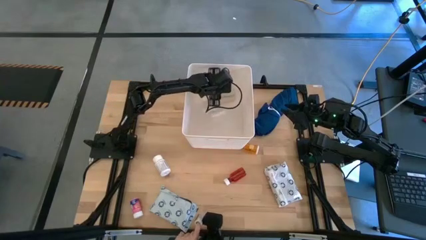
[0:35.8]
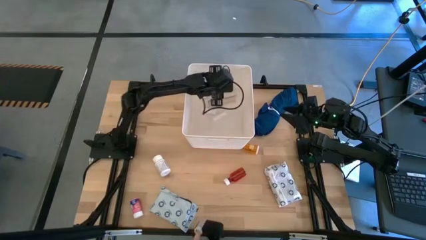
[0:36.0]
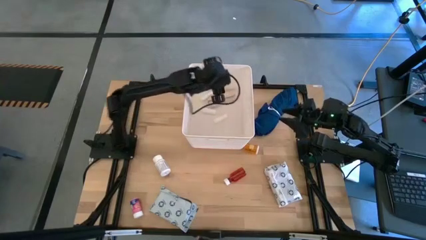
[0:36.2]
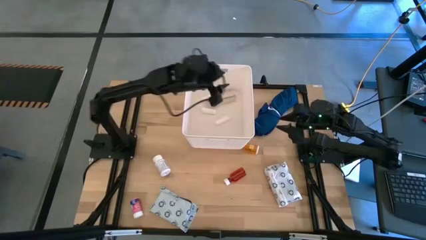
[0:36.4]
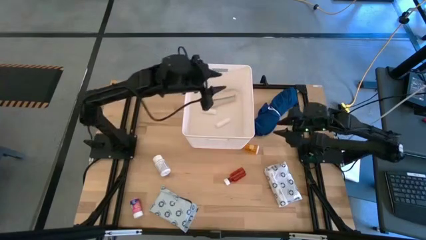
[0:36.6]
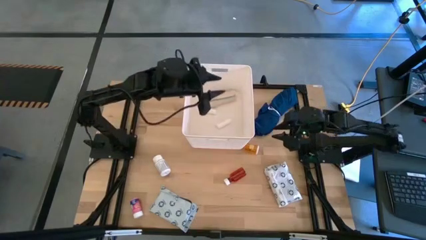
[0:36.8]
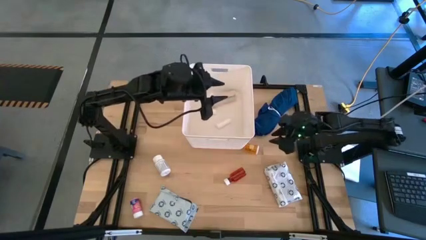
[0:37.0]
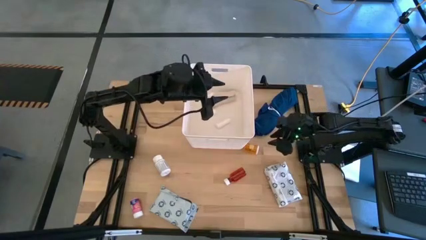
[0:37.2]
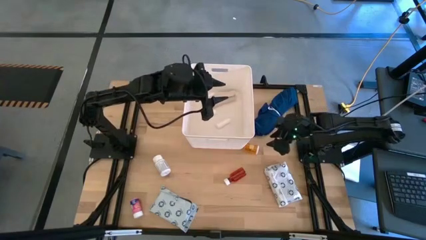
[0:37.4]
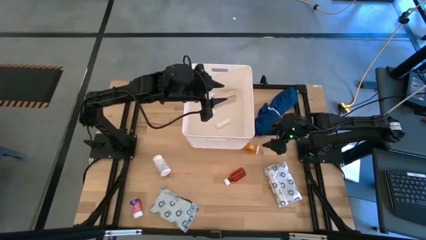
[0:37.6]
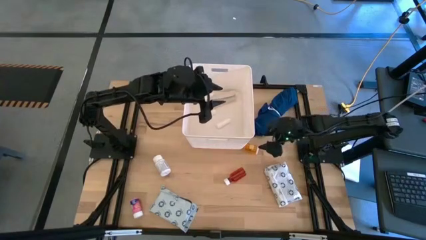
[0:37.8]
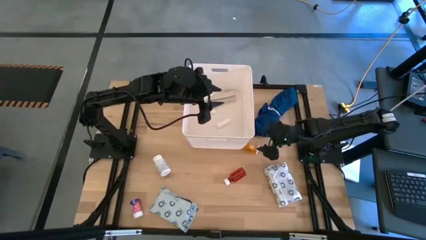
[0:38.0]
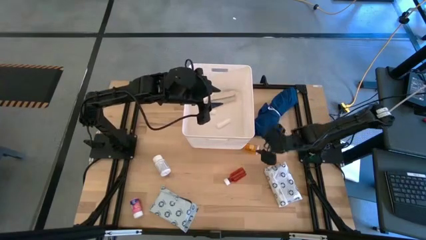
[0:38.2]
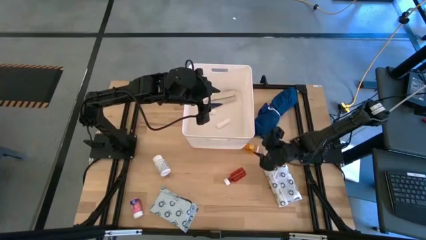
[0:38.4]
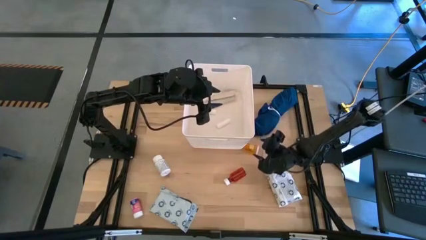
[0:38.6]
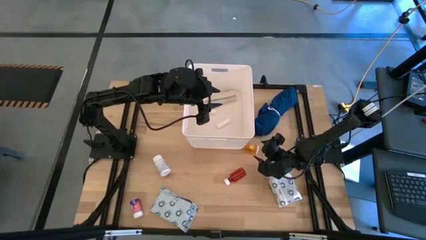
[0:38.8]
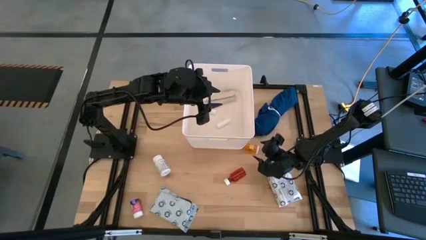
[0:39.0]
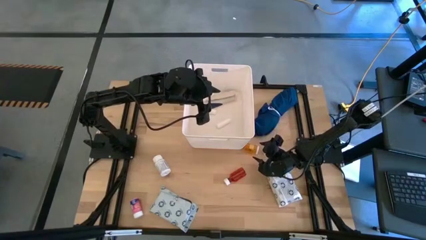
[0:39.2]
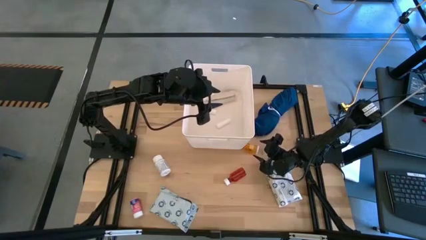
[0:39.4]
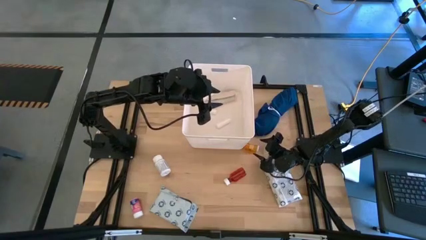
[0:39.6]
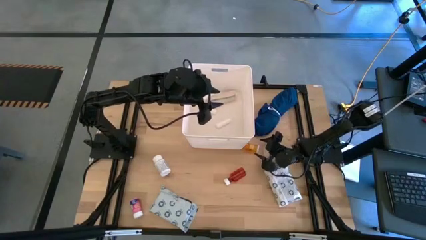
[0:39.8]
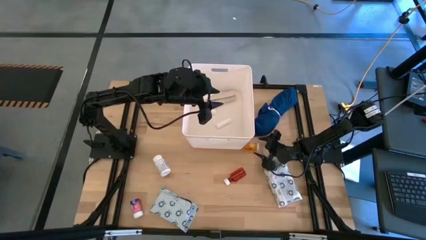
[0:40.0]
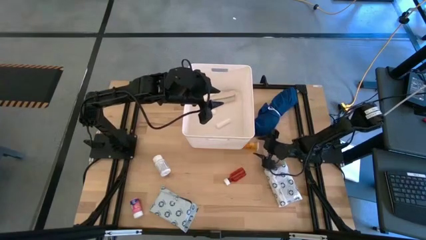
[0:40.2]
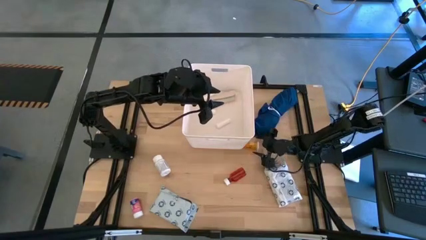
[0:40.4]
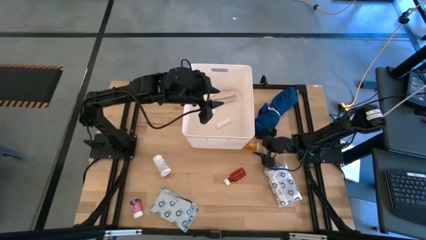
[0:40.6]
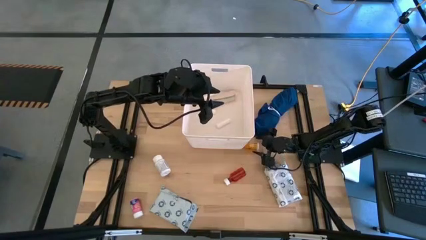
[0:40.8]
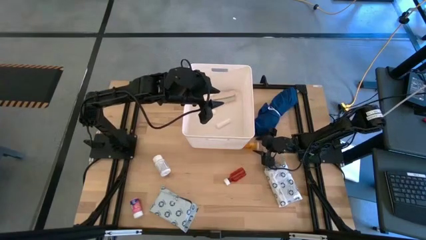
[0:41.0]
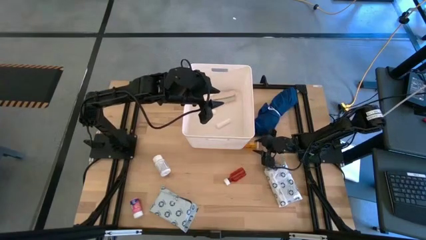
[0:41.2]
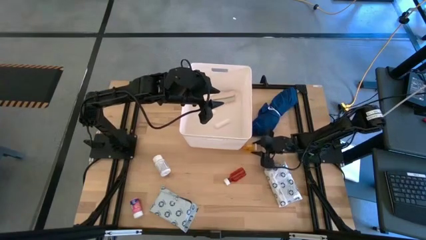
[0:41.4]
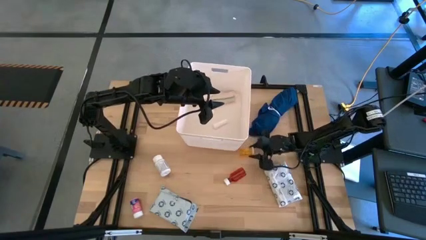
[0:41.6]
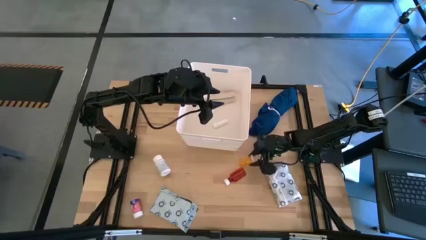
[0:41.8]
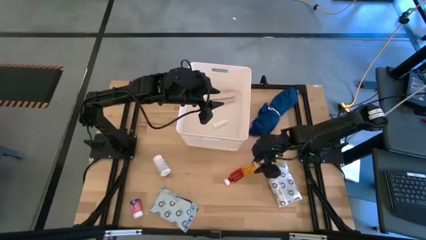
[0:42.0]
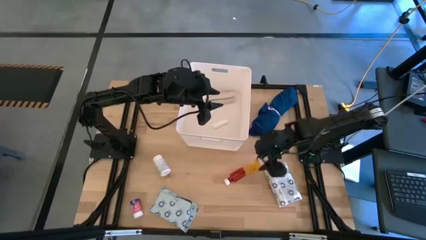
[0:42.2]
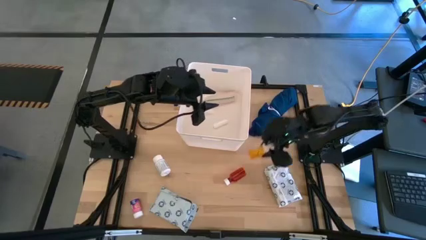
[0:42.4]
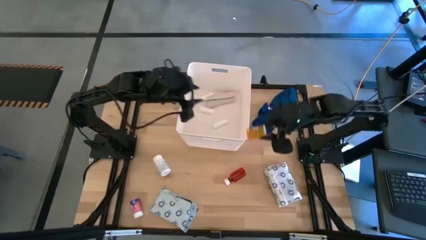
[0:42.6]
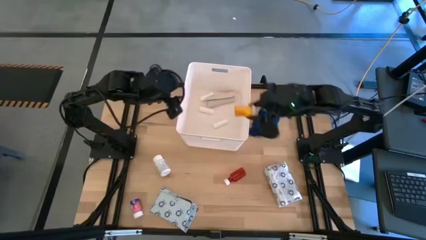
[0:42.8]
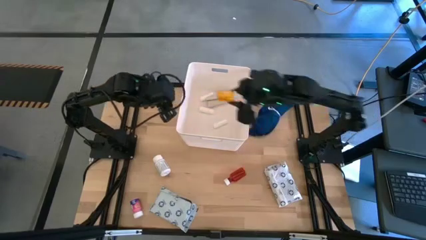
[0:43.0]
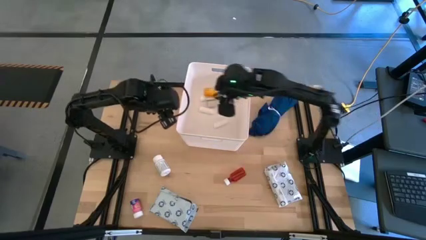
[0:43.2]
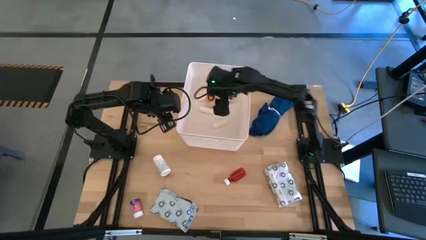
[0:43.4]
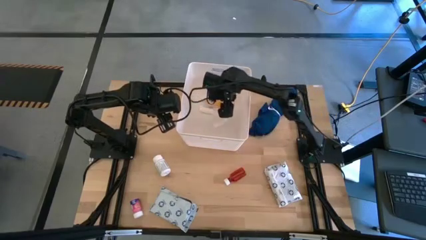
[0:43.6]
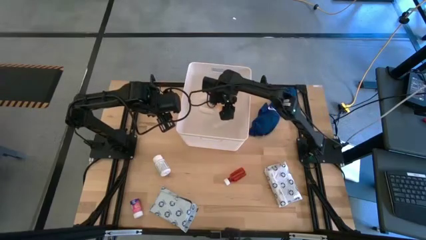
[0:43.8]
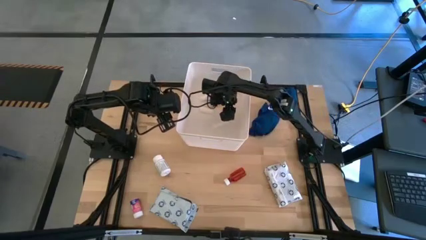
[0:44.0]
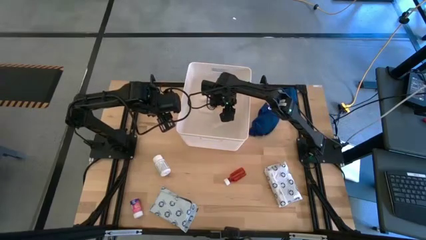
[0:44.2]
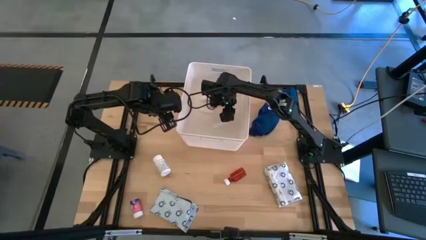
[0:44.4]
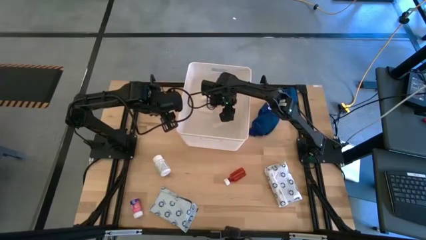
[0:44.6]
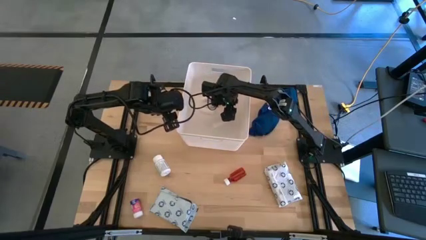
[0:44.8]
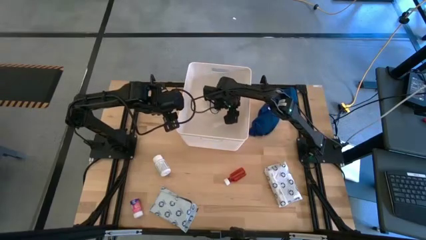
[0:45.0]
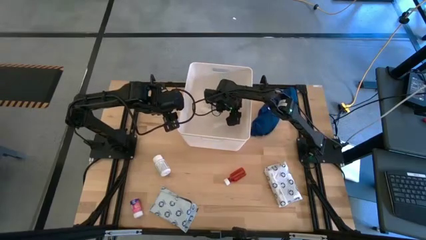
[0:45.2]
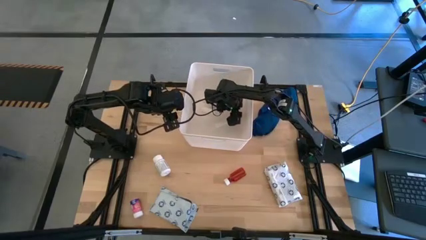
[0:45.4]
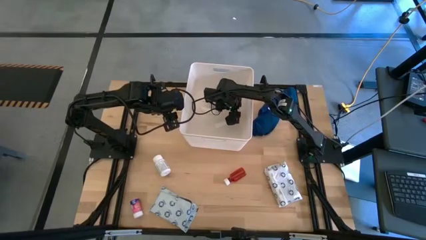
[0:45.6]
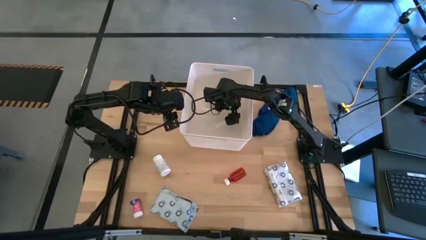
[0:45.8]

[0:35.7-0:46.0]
Task: Pick & place medical supplies in basket/bin
Put the orange pill bottle into the white basket

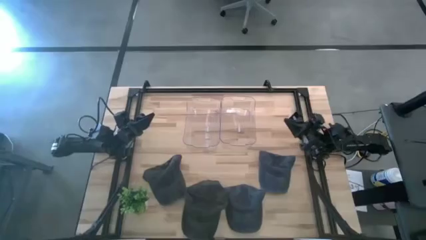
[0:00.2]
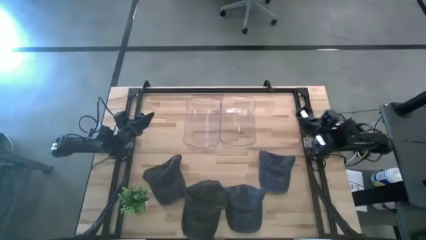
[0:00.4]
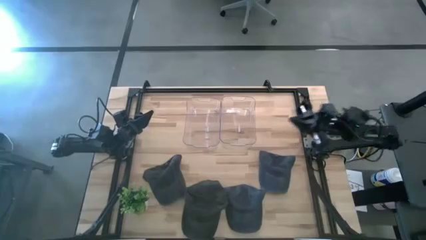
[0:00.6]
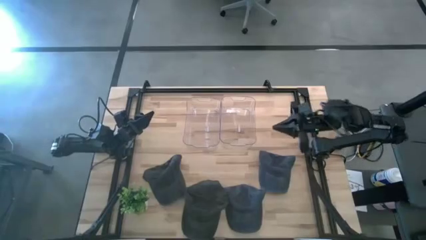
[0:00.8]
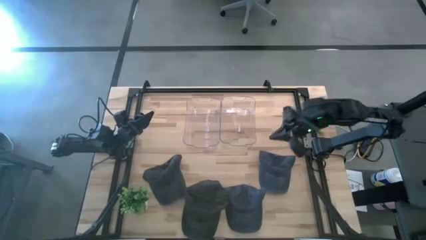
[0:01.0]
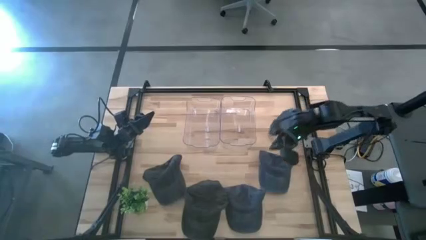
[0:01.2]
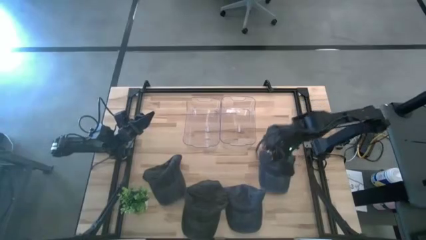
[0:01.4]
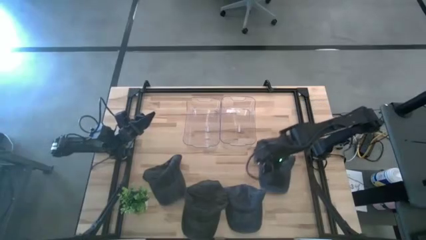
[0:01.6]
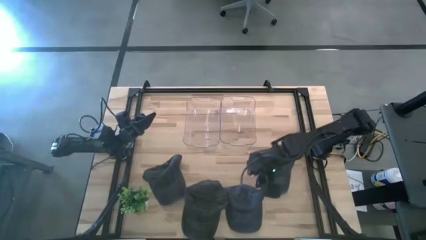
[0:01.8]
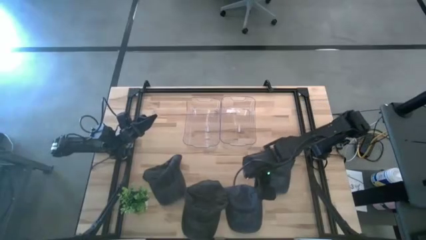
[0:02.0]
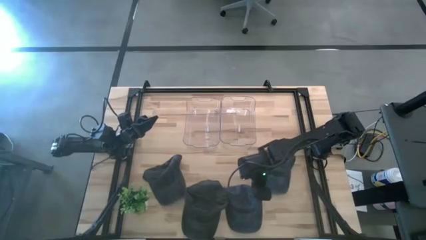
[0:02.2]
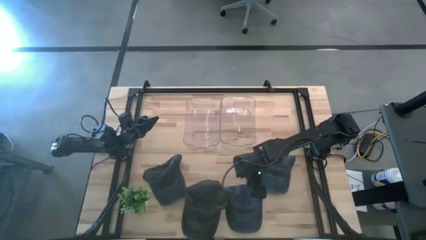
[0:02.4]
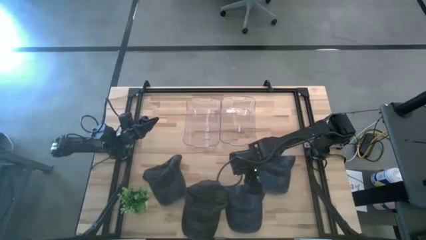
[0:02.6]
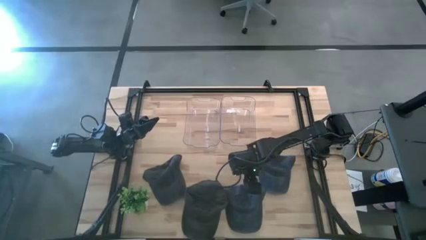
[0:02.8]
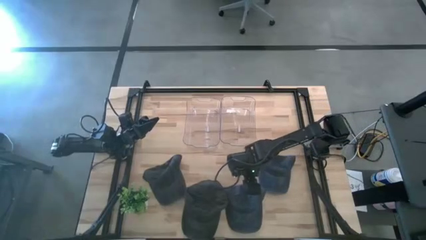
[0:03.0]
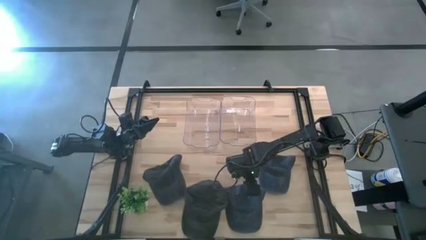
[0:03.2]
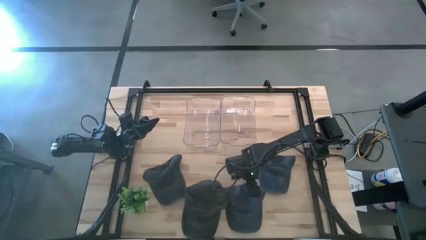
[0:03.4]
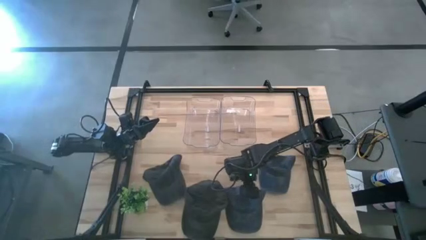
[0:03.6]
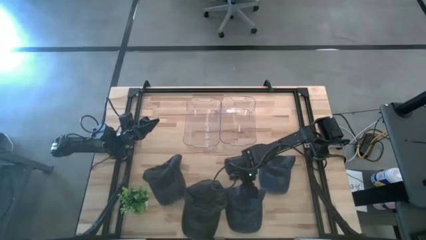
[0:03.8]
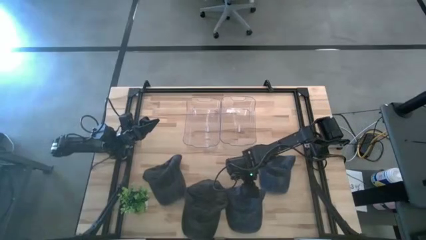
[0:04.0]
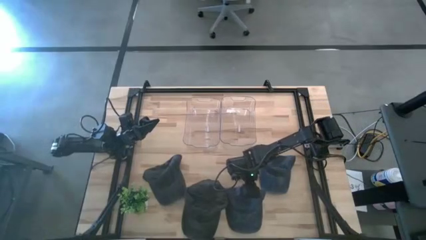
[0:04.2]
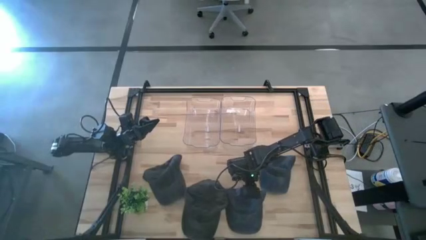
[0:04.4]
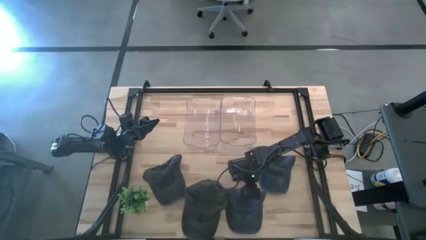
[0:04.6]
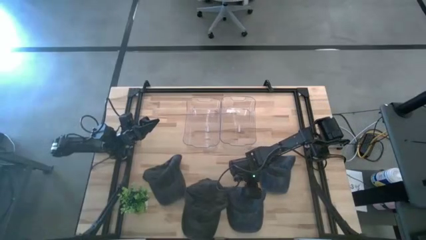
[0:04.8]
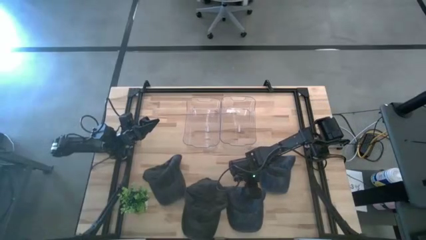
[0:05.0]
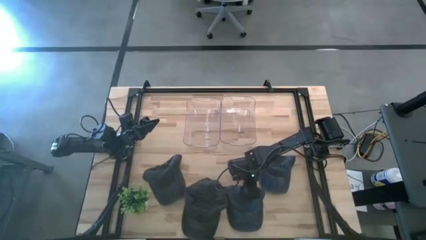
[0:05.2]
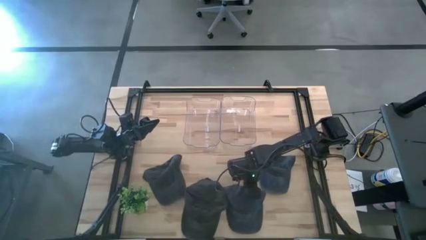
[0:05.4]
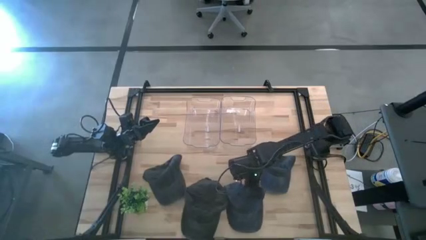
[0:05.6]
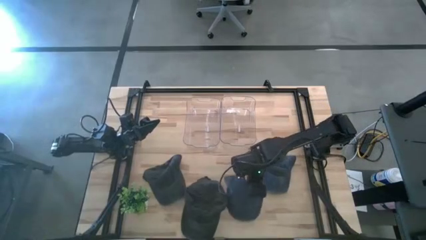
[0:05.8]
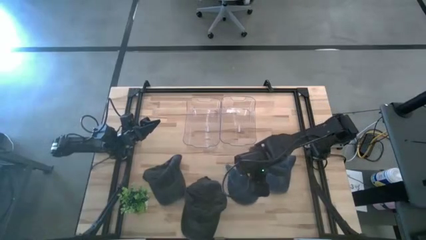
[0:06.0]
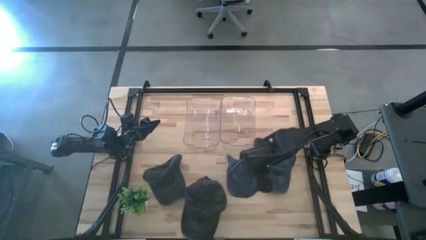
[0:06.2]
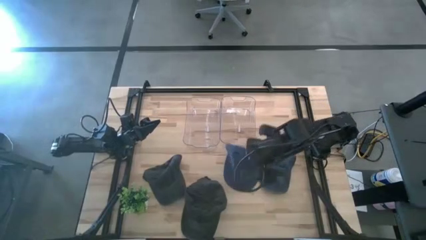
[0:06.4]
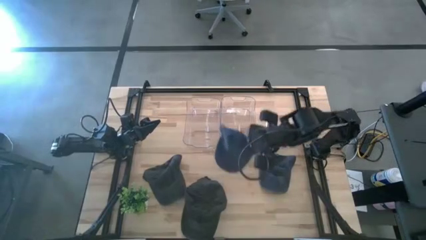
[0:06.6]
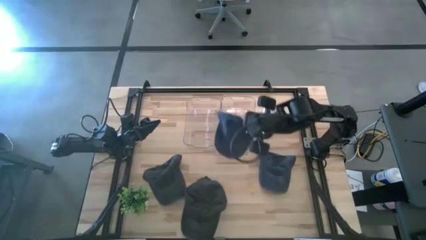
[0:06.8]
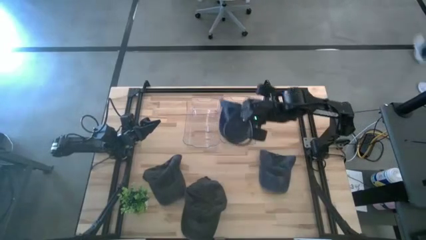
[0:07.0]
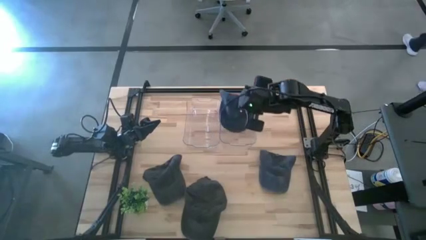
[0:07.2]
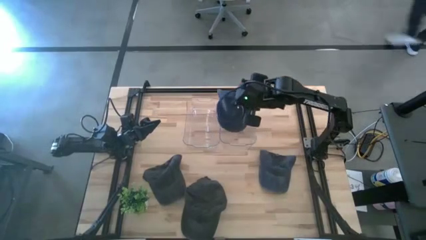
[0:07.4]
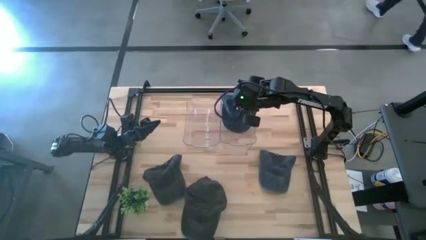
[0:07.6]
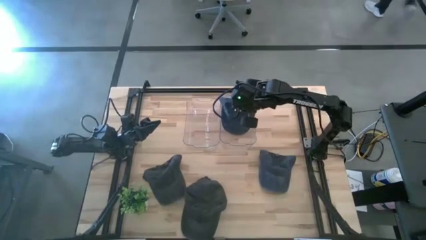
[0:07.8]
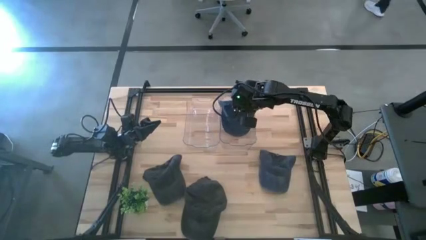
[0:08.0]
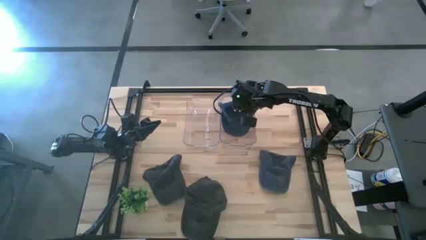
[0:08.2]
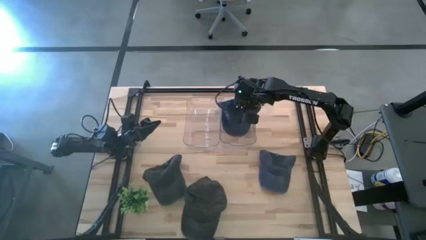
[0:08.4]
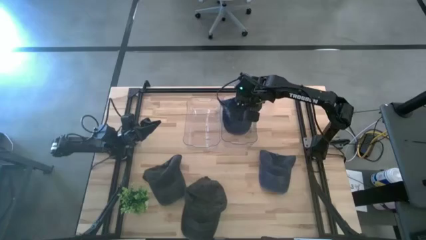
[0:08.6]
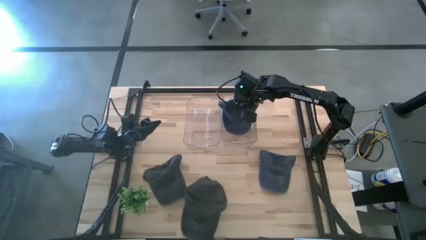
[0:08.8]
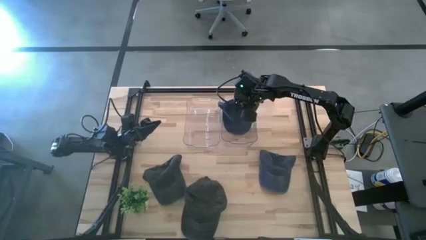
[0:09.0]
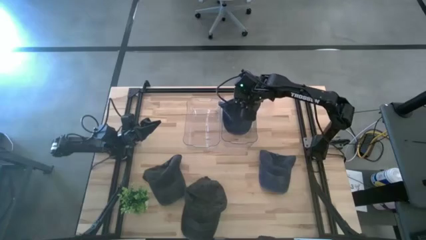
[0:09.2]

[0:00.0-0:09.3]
Task: Pick & Place hat
Put the bottom blue cap into the right transparent bin
